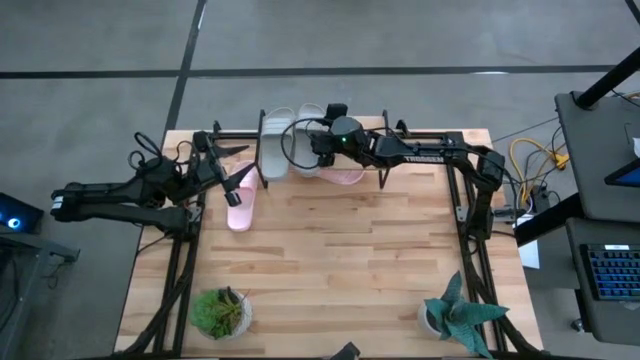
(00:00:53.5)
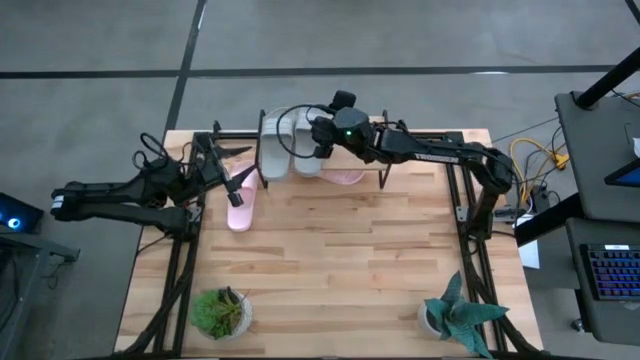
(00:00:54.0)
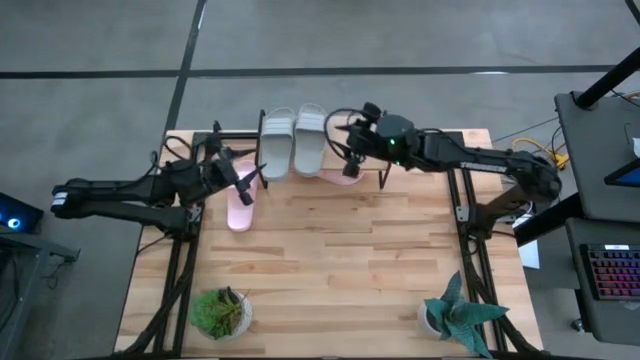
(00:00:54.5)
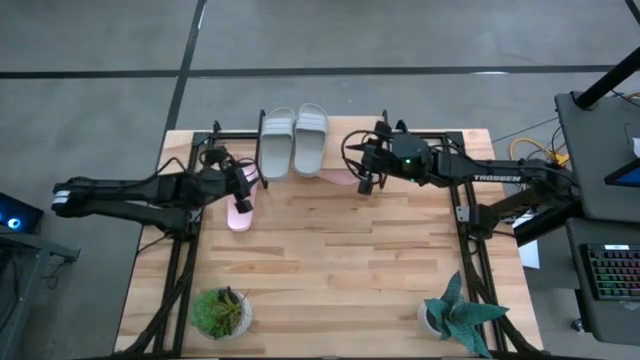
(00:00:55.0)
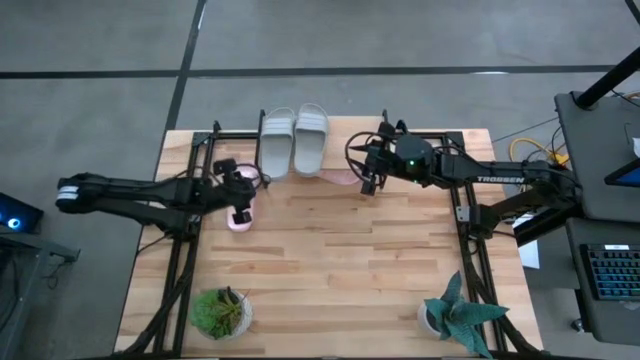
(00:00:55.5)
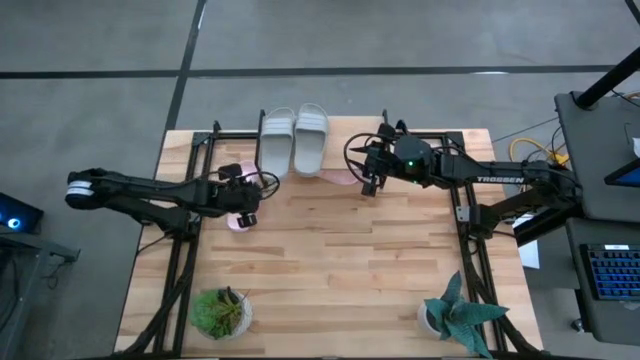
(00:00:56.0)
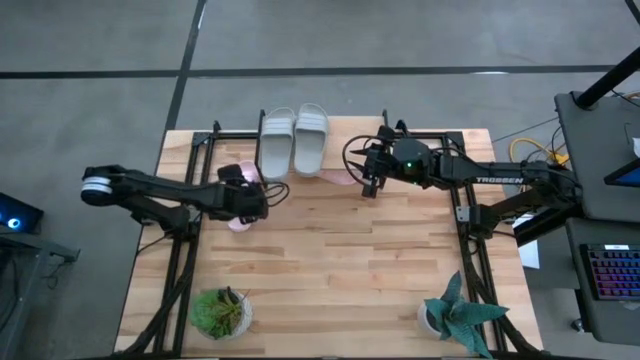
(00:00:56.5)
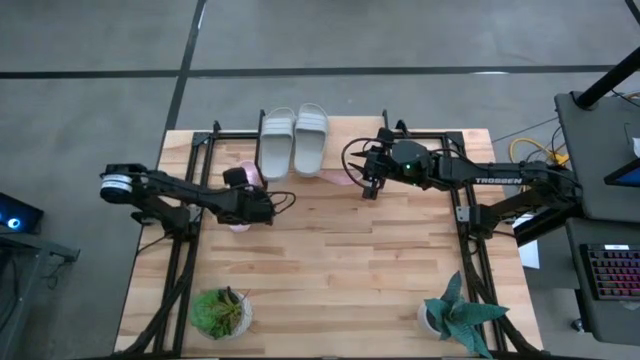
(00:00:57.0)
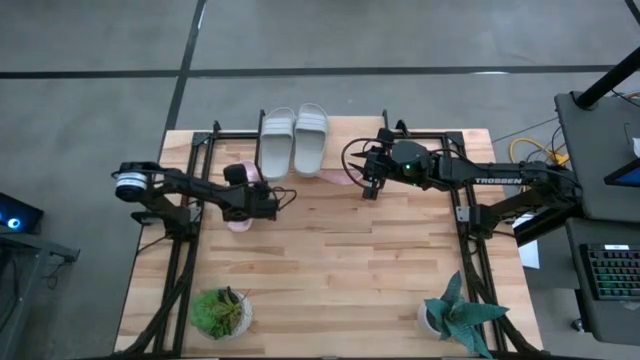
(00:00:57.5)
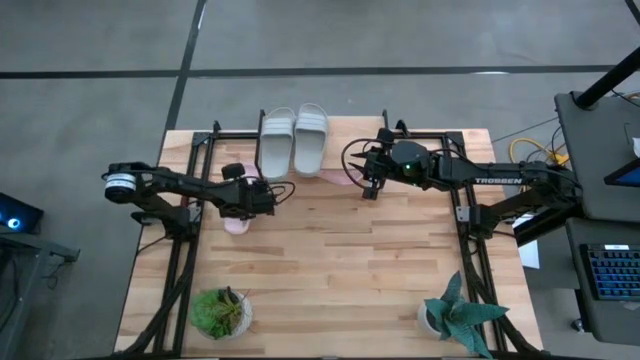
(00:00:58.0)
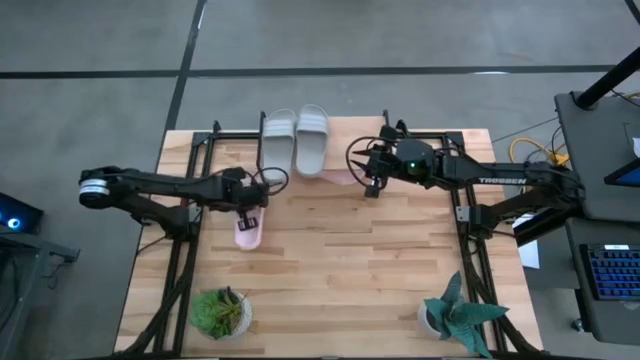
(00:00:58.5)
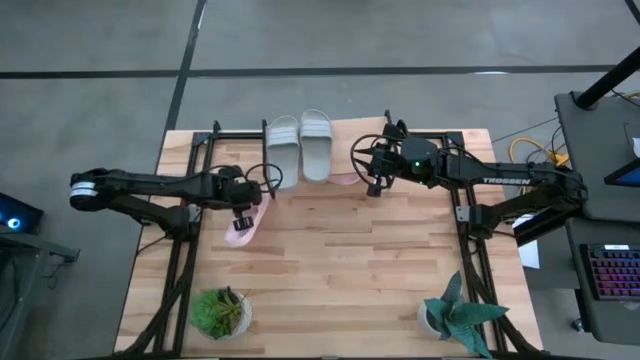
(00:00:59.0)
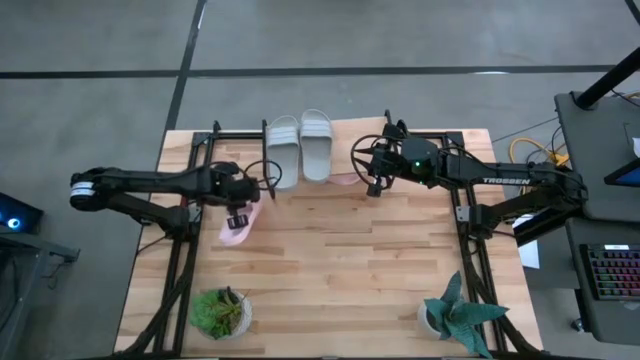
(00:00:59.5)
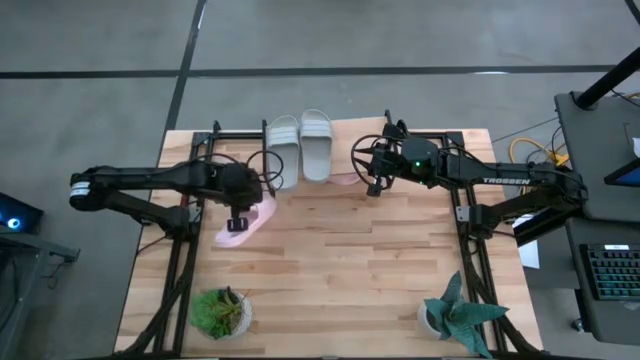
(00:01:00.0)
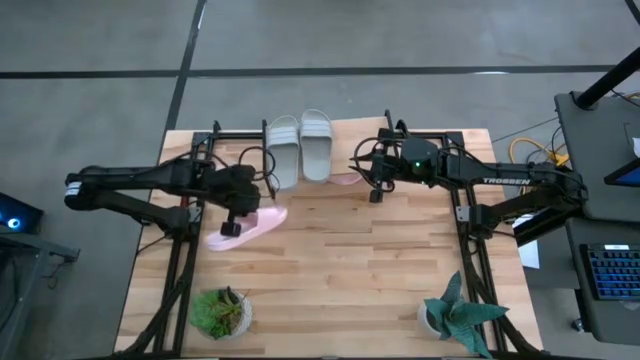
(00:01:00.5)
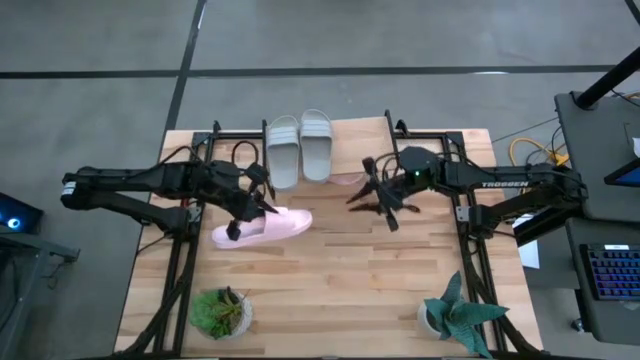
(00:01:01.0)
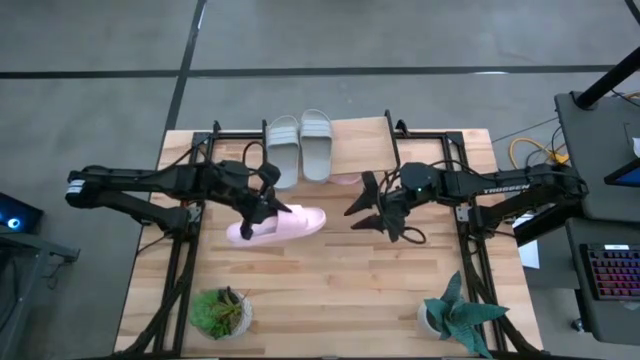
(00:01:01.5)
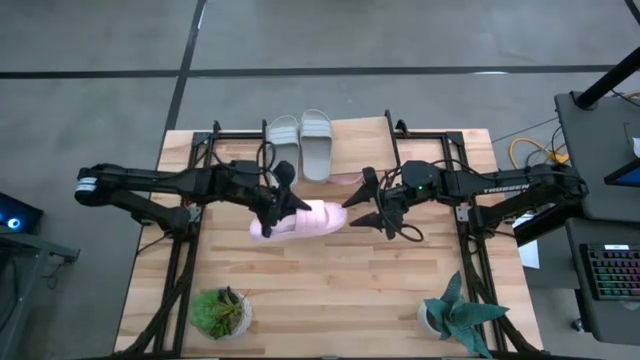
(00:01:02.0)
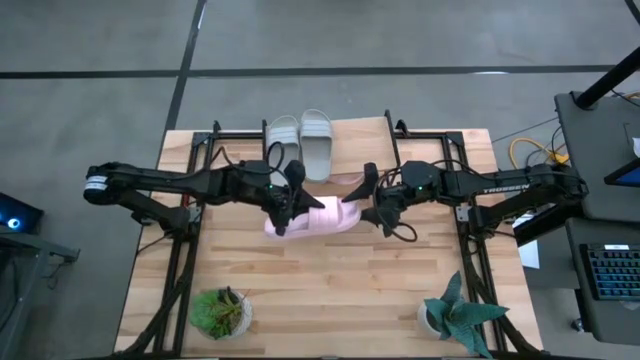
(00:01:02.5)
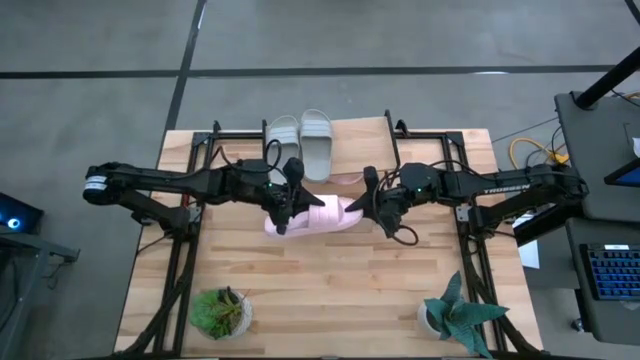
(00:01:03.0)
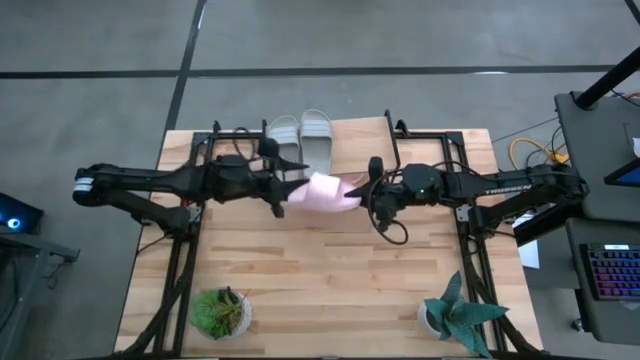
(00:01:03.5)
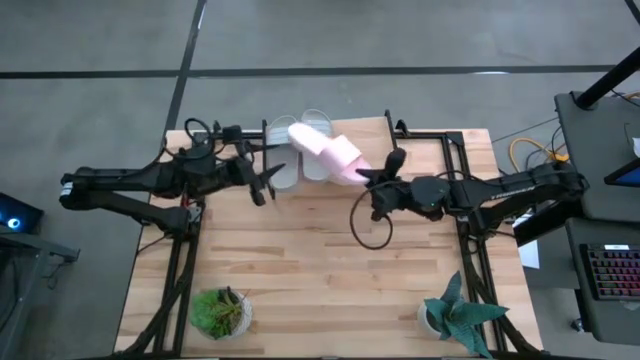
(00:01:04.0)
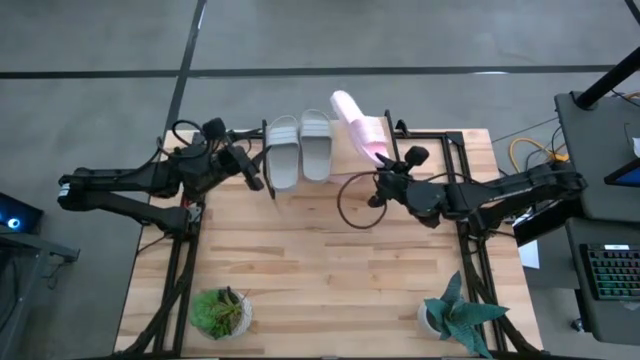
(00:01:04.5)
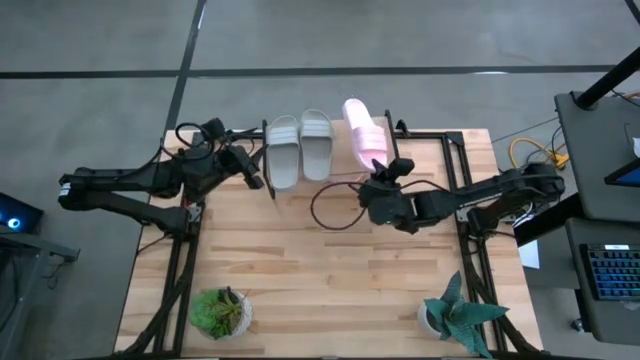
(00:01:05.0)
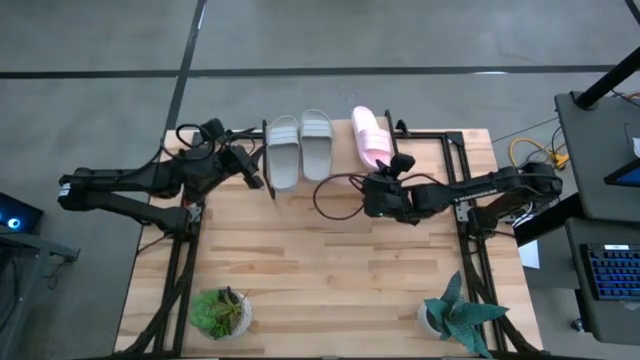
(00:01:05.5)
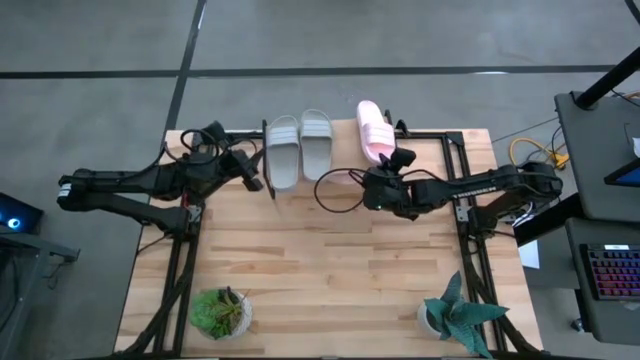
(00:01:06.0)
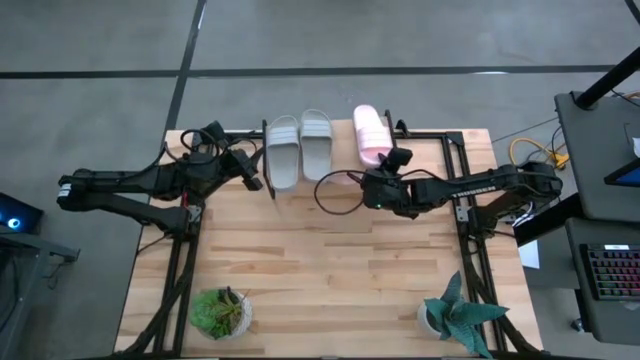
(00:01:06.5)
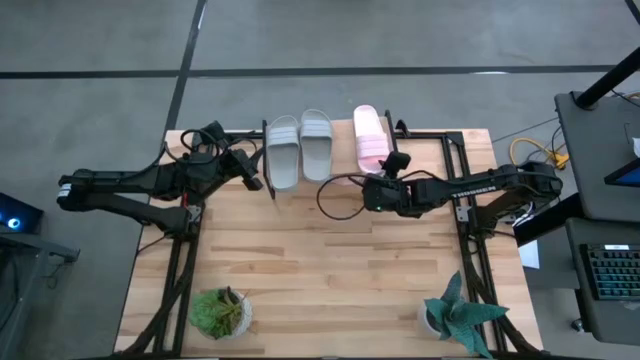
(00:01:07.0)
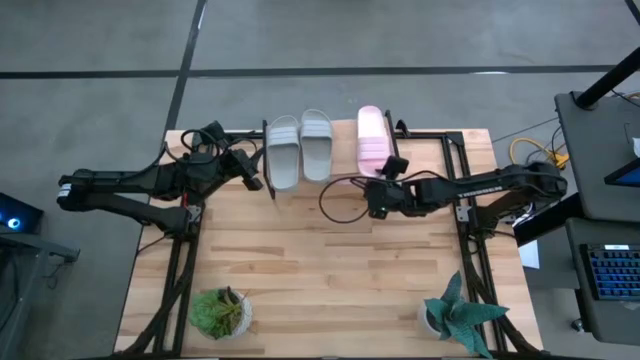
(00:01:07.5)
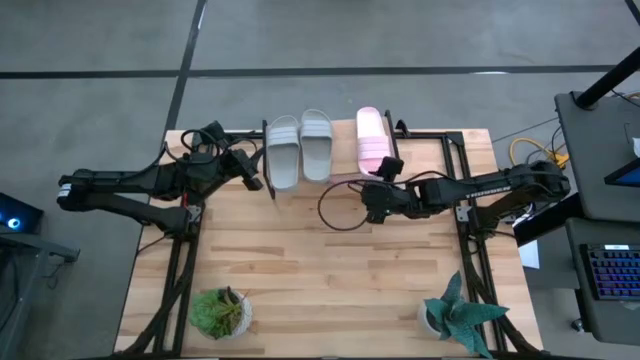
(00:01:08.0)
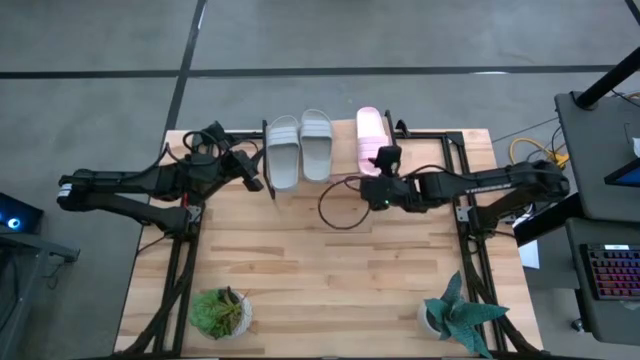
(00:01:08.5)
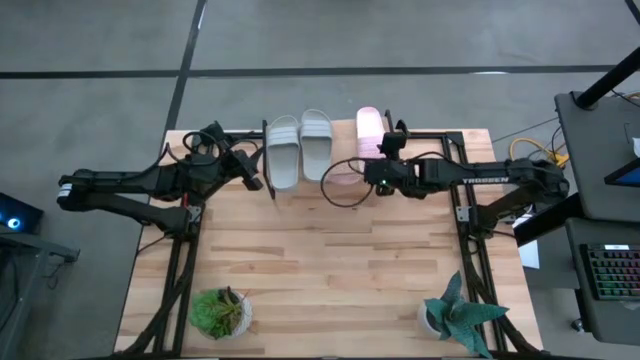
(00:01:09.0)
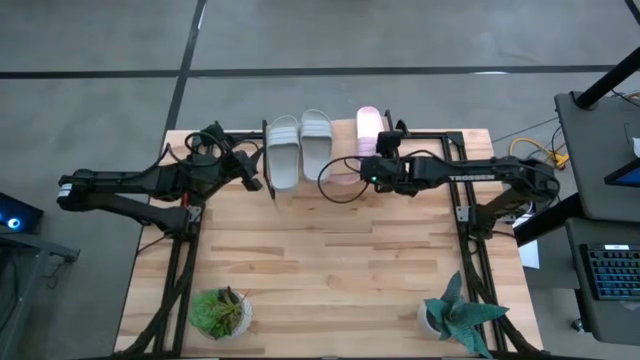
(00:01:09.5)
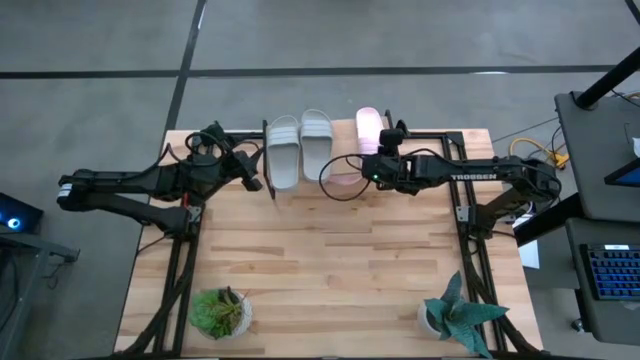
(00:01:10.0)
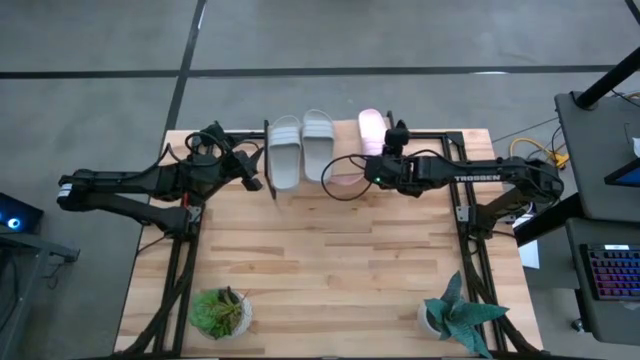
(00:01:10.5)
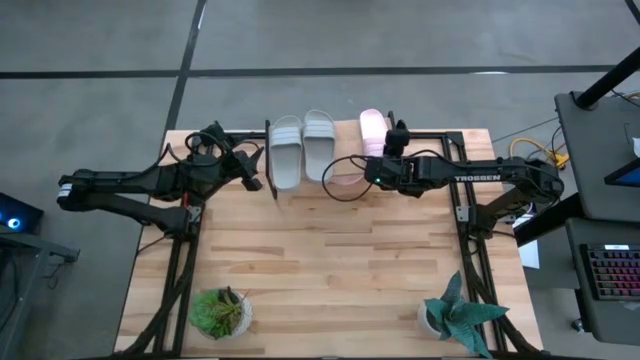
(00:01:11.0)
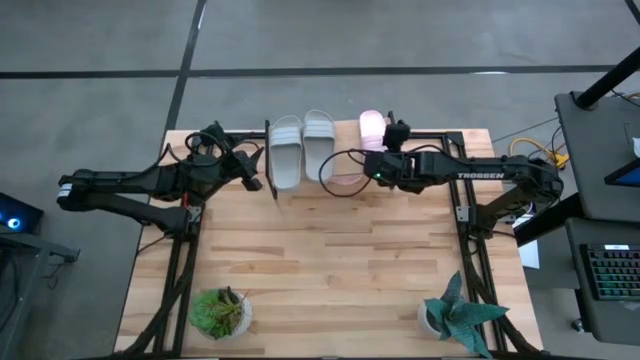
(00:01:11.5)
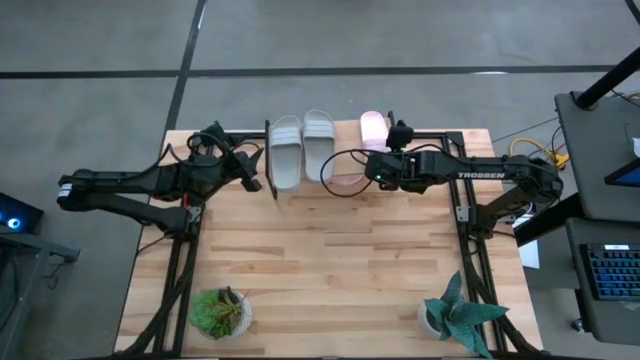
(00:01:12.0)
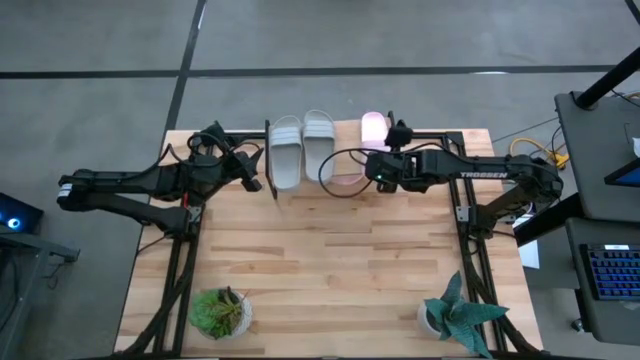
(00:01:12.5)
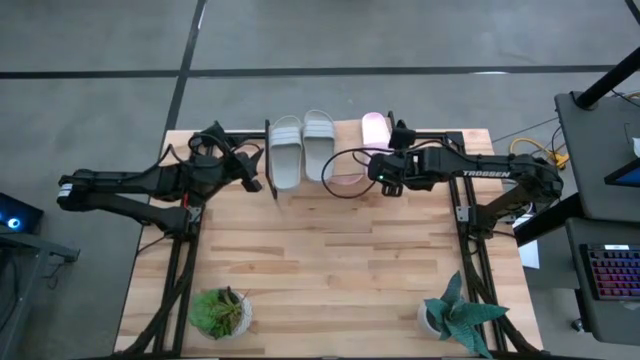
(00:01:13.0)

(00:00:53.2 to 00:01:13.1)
Task: Pick and place slides into the shelf
Put the left light pink slipper on the shelf
